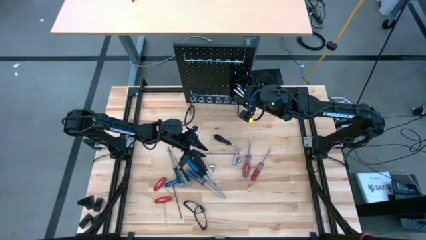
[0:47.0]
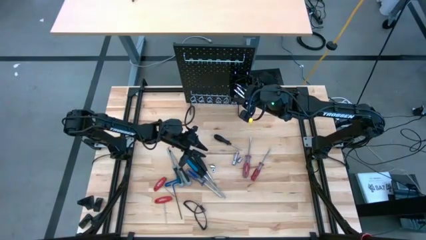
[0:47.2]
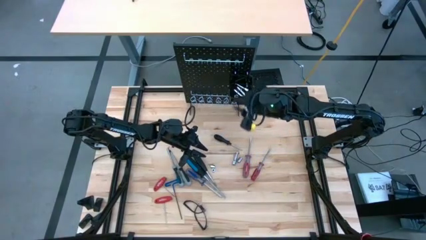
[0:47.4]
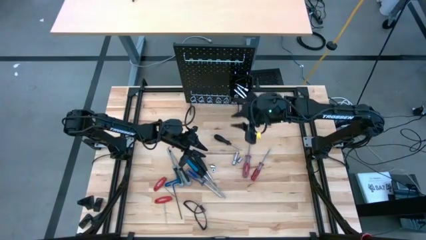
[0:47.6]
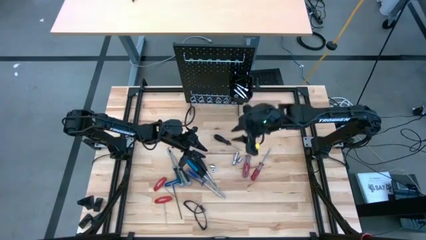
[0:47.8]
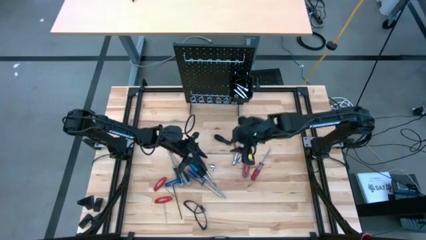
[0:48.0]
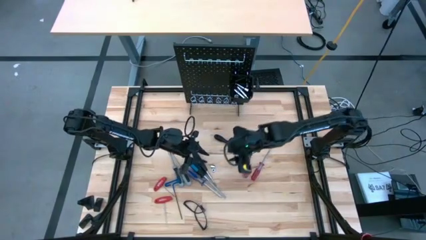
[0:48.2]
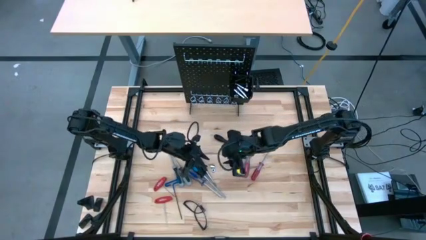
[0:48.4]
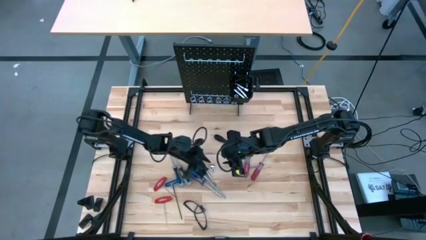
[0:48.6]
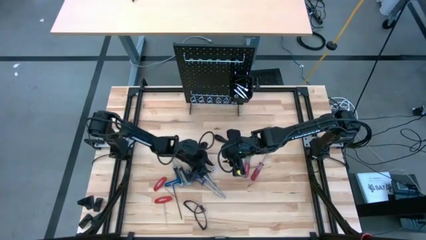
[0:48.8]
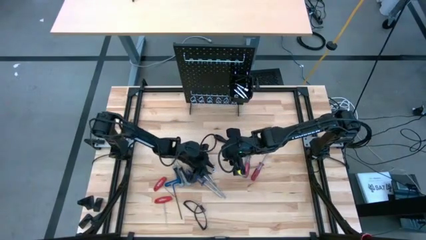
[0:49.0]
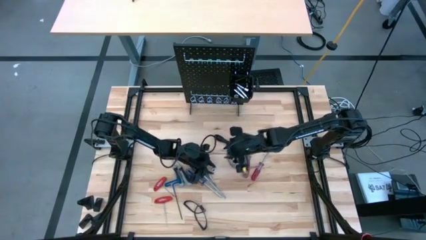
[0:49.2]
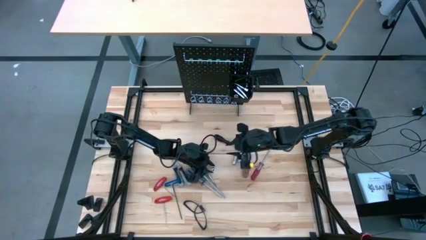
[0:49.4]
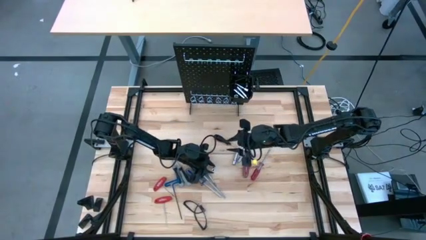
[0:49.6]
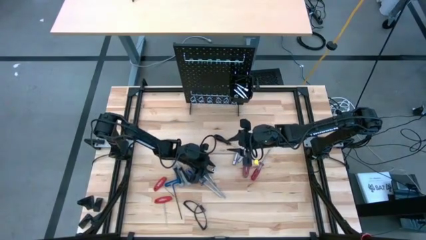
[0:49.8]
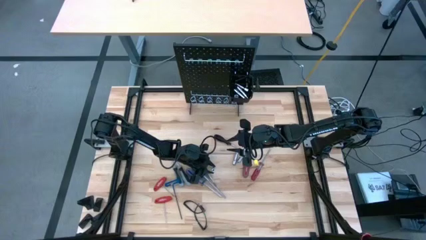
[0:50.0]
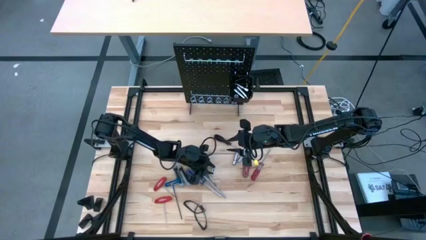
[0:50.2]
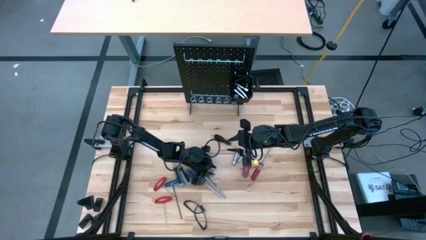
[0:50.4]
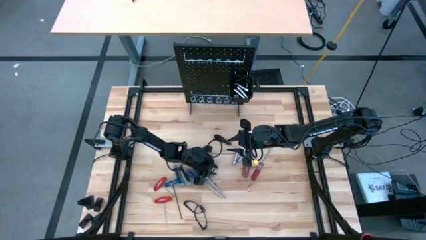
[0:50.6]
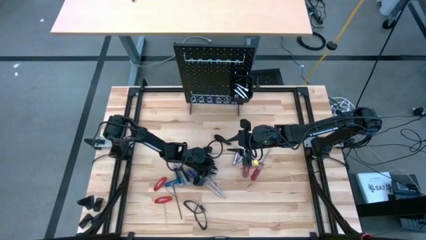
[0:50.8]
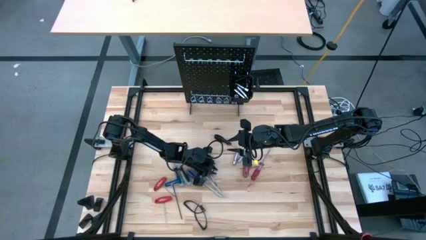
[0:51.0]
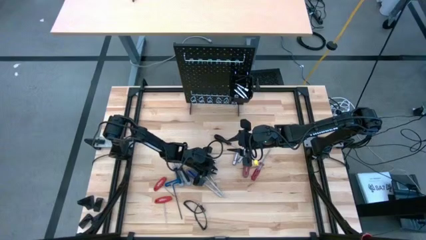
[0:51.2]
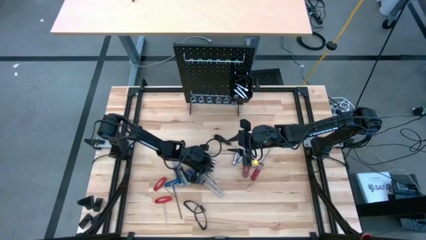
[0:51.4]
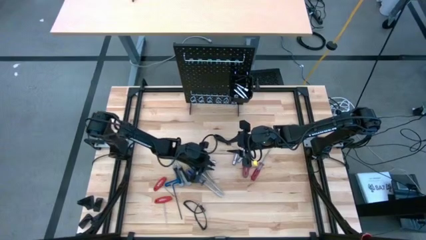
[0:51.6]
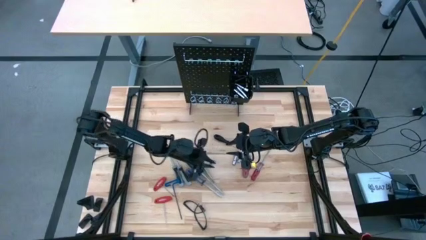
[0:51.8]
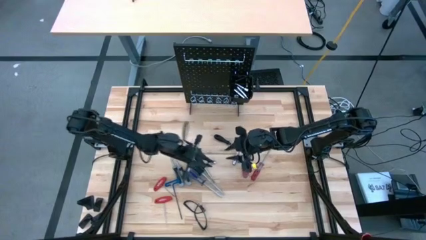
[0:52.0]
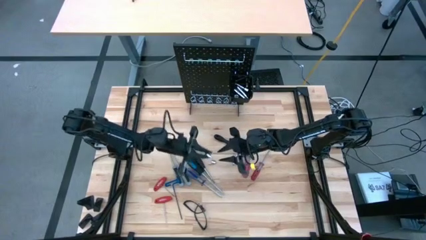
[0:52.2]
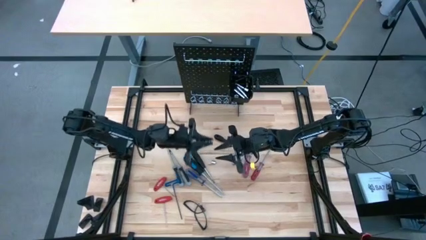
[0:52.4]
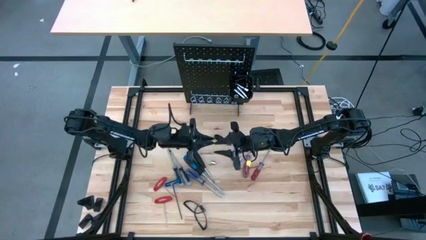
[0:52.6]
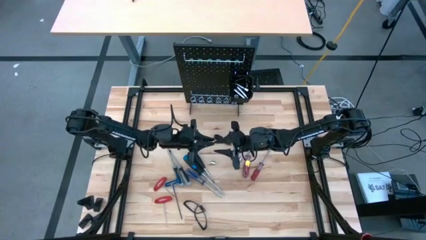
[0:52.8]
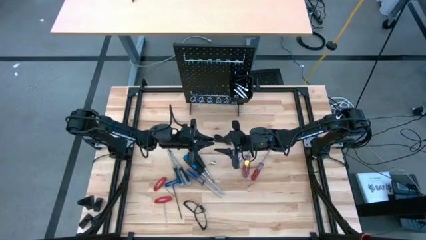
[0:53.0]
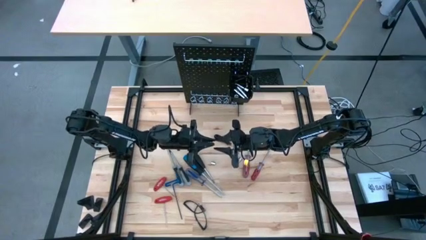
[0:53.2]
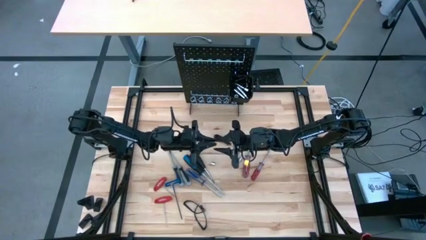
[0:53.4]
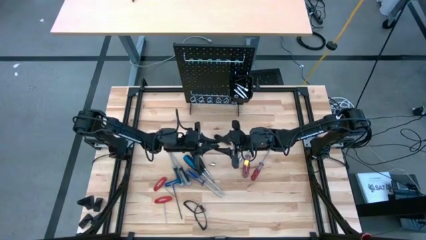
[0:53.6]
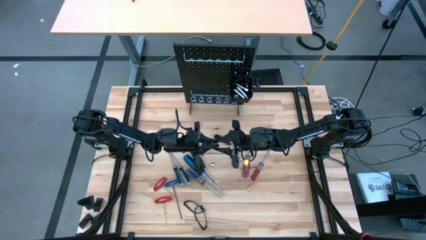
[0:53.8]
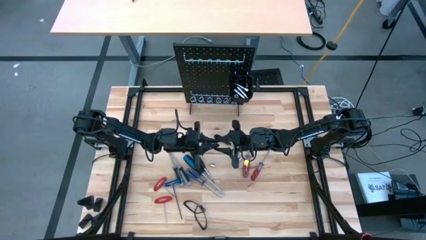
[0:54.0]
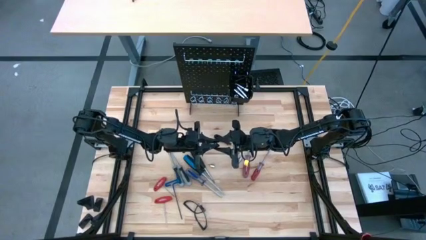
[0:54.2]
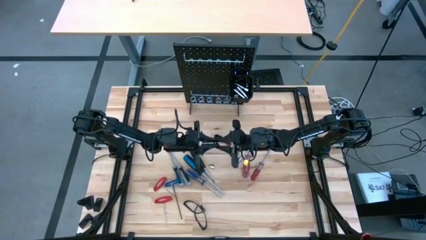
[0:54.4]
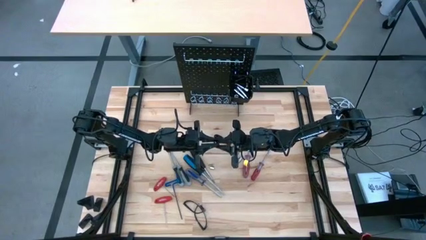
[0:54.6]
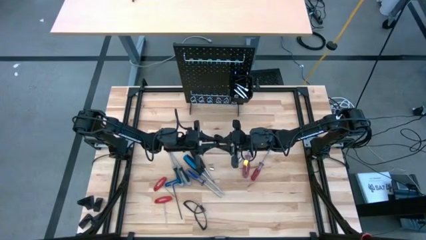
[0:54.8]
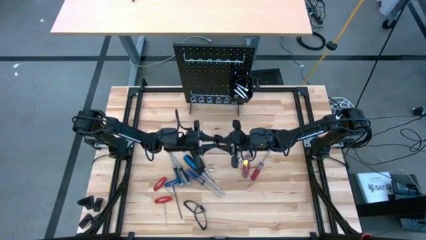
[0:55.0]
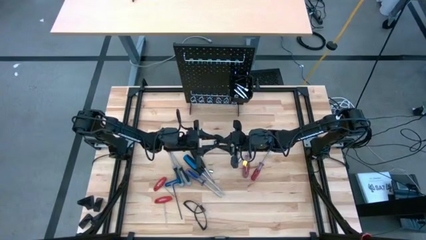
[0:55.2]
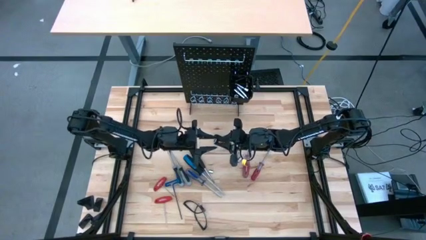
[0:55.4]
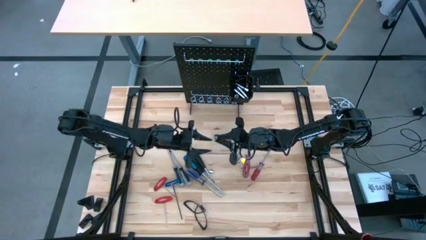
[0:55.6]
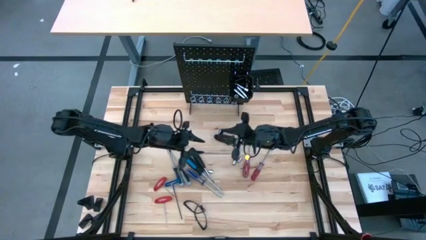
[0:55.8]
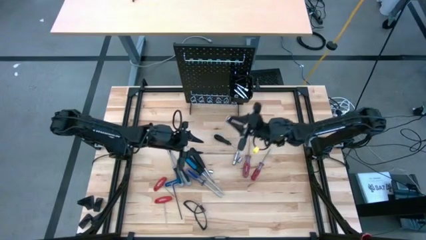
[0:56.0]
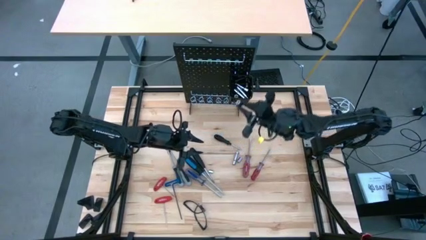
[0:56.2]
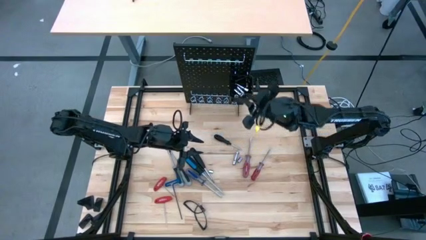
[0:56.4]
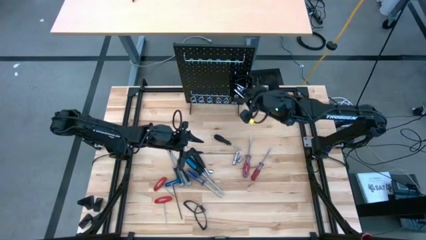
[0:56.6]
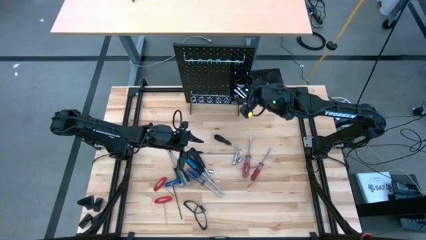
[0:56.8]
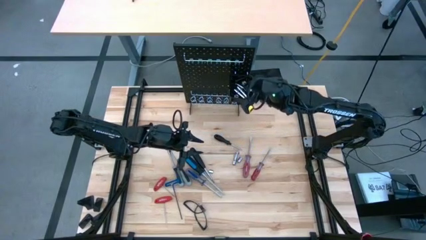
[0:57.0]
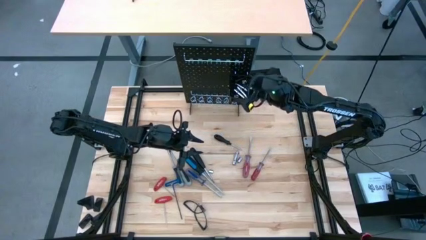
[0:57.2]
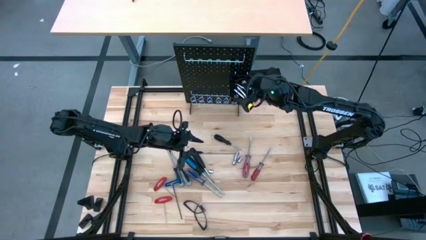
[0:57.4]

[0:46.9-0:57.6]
Task: Hang tools onto peg board
Put the socket into the black bin on the pegboard

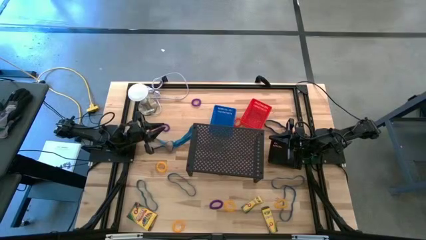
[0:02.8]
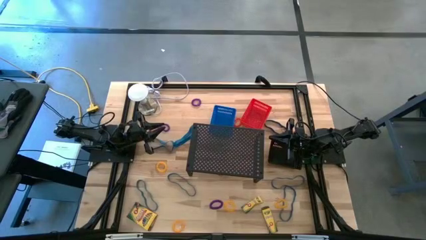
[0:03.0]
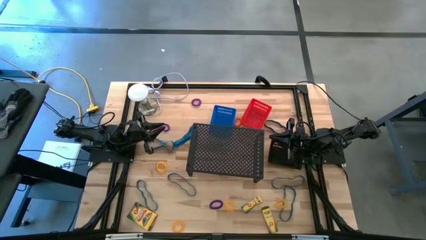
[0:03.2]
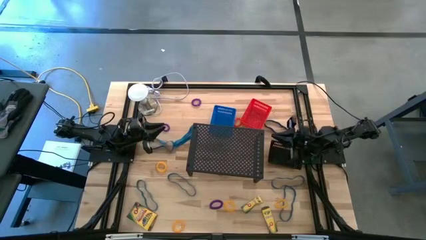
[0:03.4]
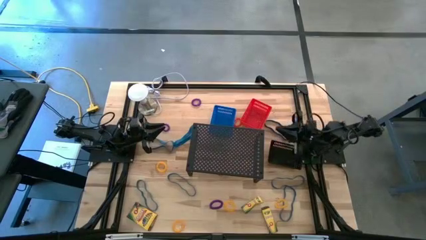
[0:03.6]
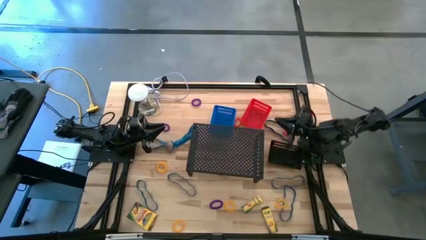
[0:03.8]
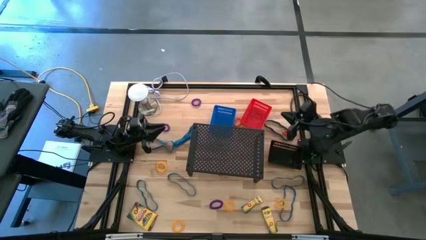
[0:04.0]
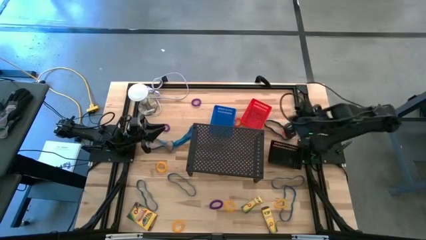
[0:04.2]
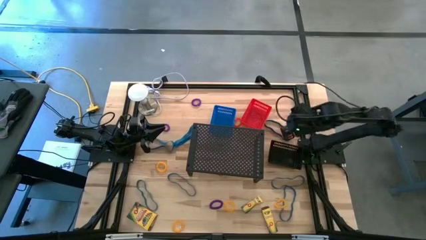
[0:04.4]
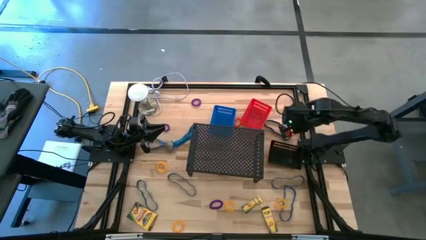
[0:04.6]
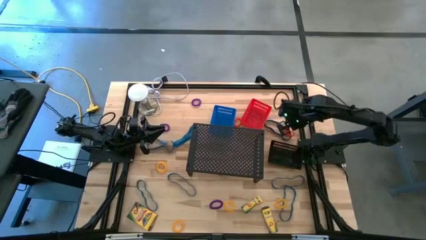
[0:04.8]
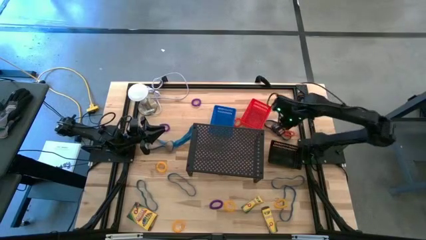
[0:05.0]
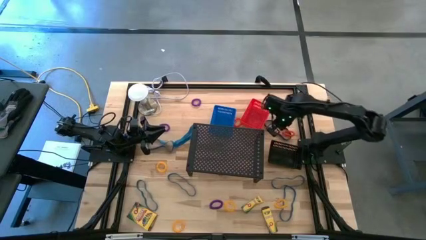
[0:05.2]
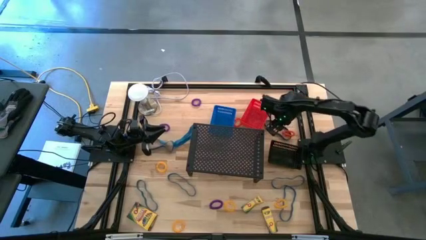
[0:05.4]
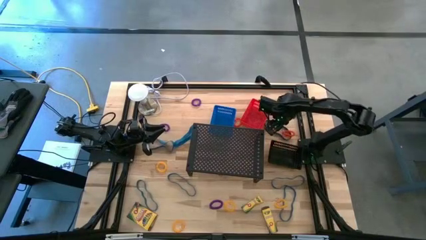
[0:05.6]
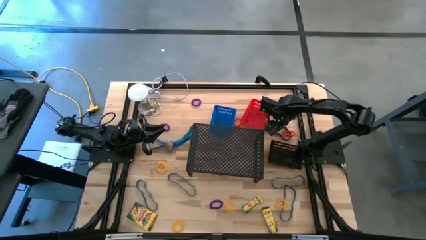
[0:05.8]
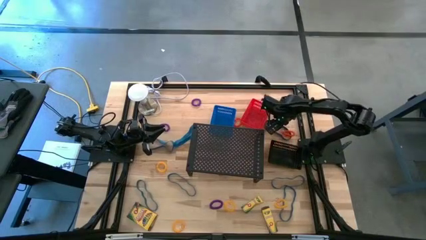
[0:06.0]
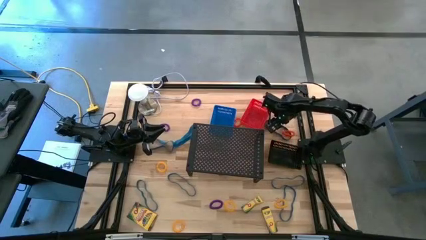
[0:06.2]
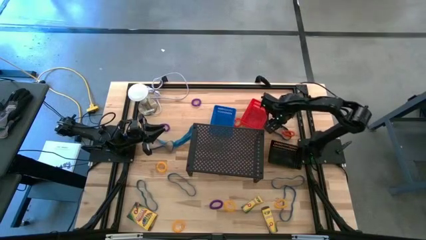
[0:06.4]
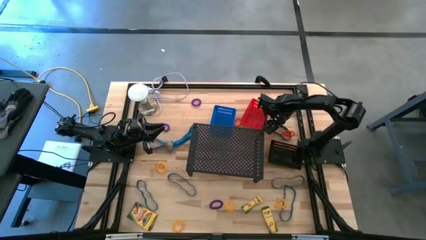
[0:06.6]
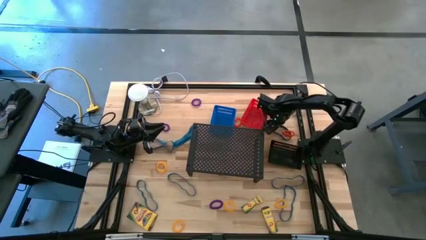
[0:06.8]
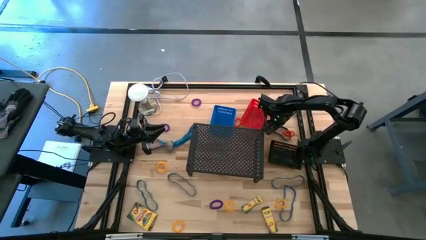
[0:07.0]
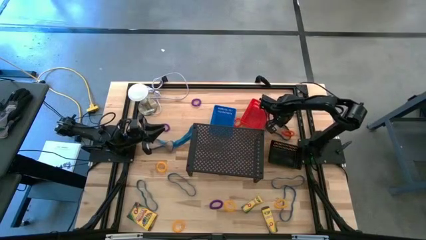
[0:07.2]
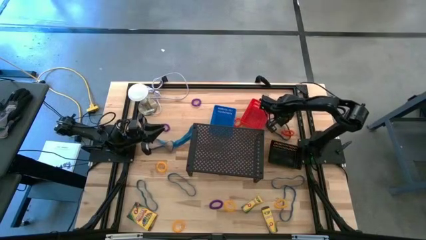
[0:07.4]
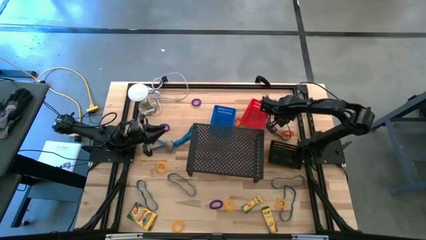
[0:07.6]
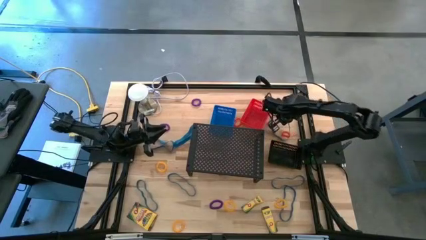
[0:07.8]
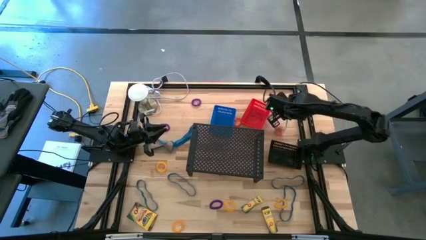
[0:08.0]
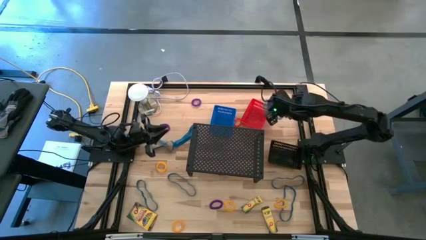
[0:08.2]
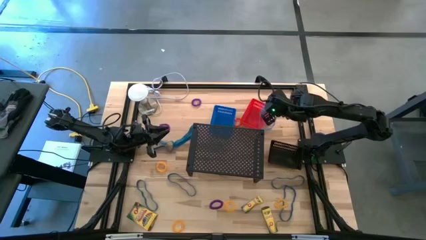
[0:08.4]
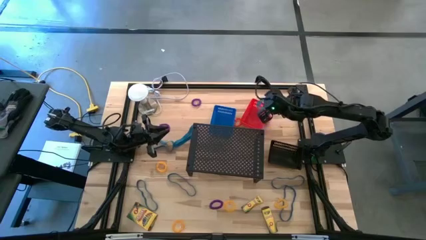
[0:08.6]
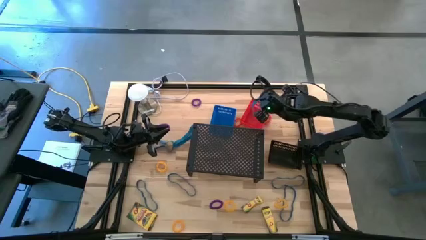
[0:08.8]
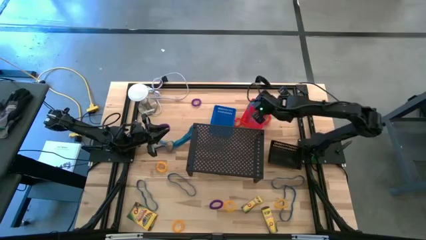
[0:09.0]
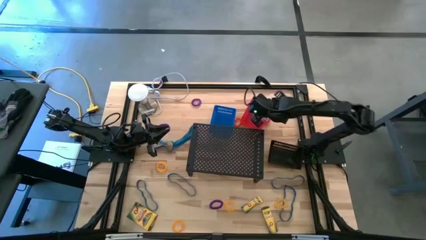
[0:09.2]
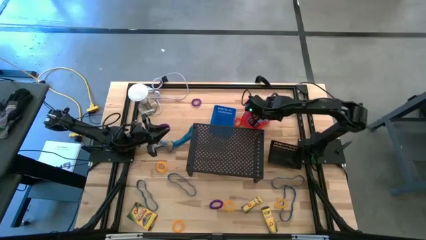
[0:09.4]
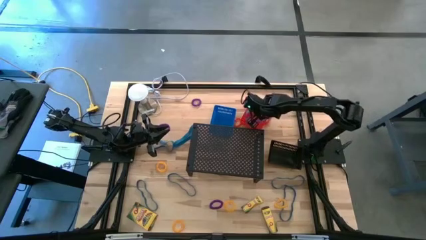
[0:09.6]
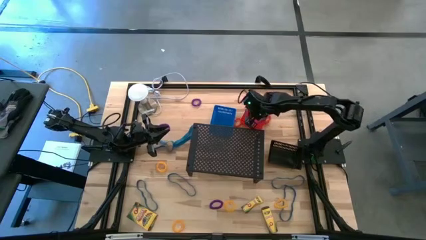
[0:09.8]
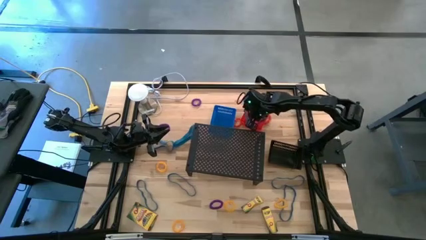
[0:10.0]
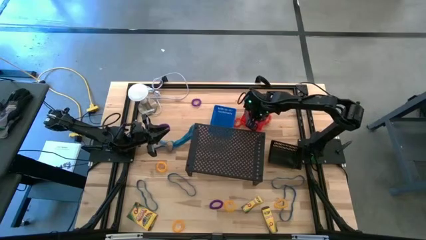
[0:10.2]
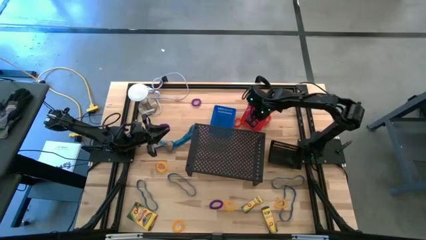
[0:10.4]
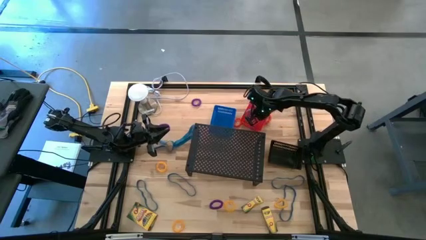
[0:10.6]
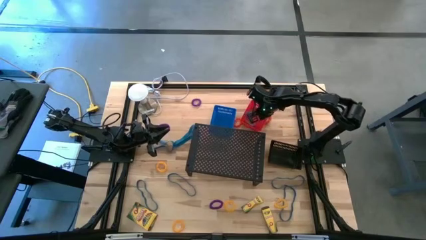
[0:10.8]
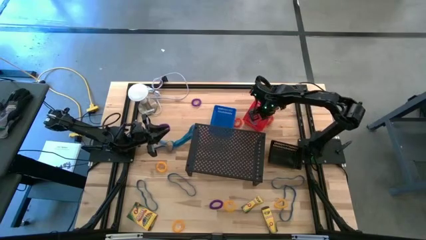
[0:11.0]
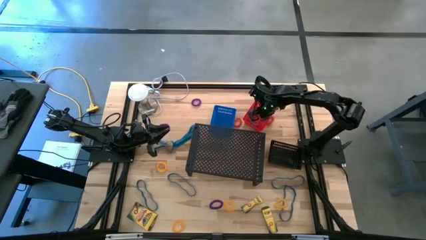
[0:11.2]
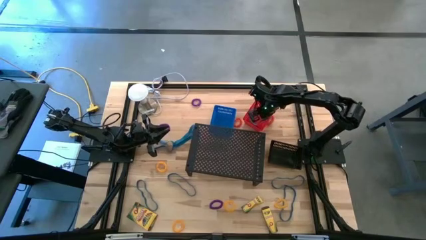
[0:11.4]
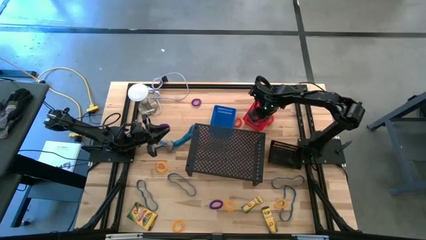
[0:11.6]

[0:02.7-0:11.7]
Task: Pick & Place Office Desk Supplies
Put the blue rubber band into the red bin
